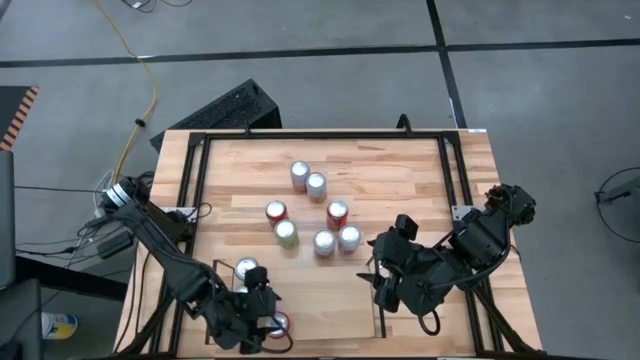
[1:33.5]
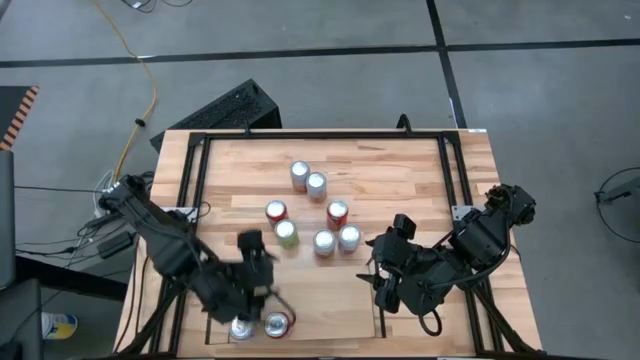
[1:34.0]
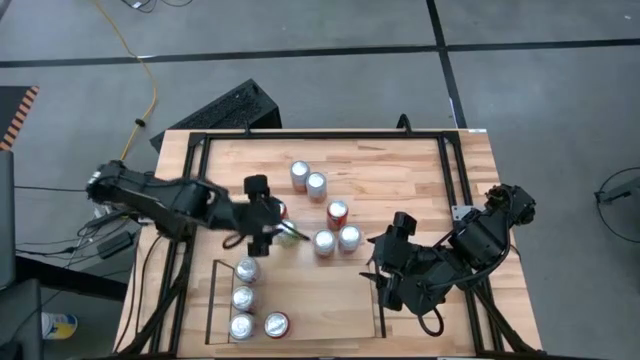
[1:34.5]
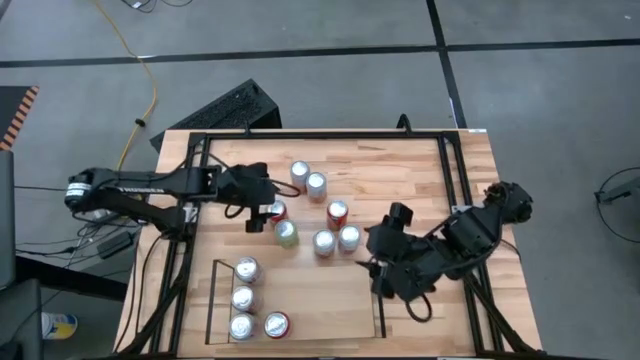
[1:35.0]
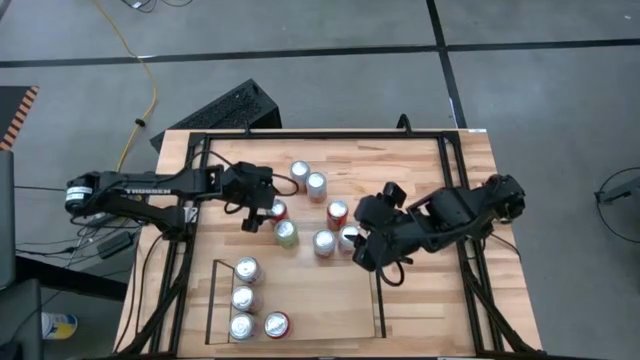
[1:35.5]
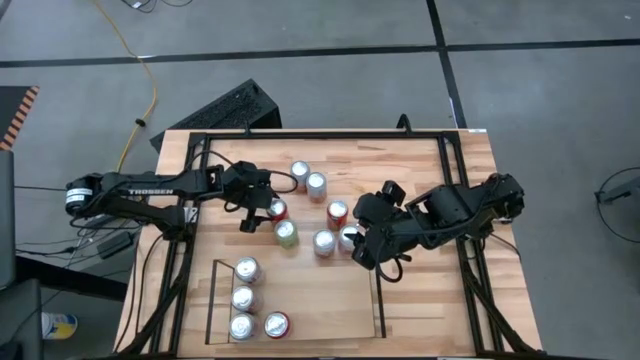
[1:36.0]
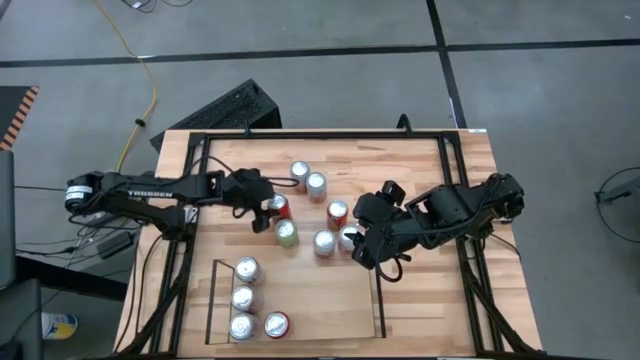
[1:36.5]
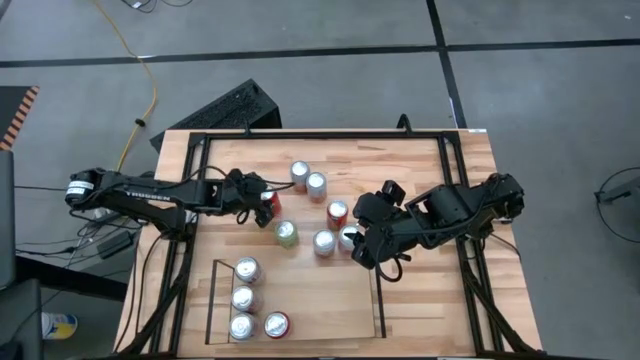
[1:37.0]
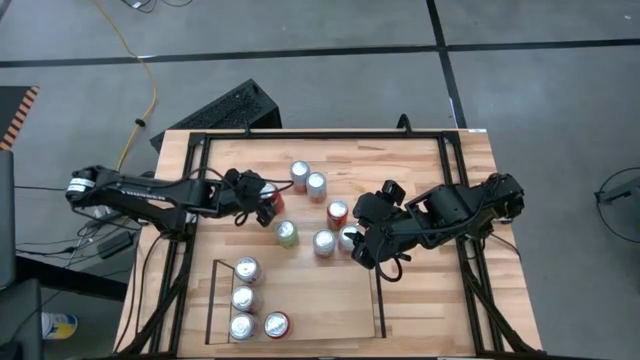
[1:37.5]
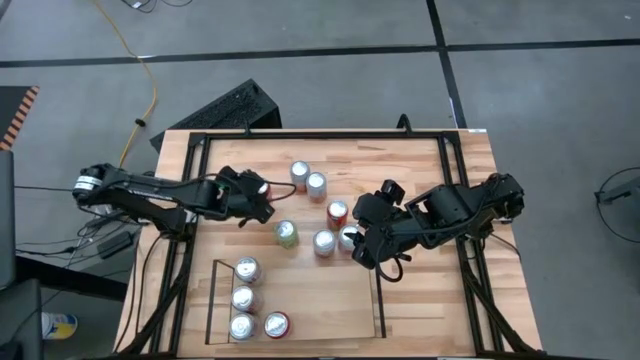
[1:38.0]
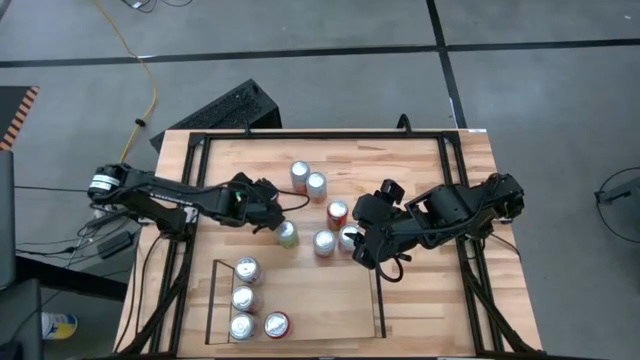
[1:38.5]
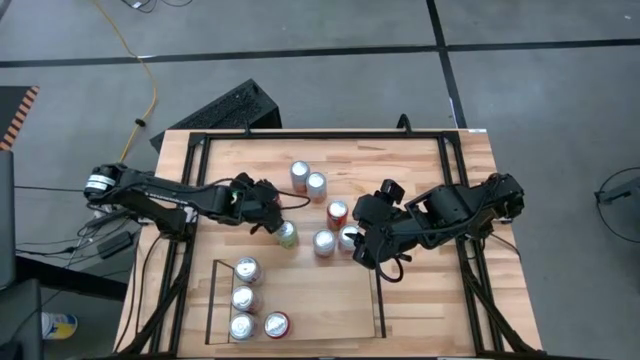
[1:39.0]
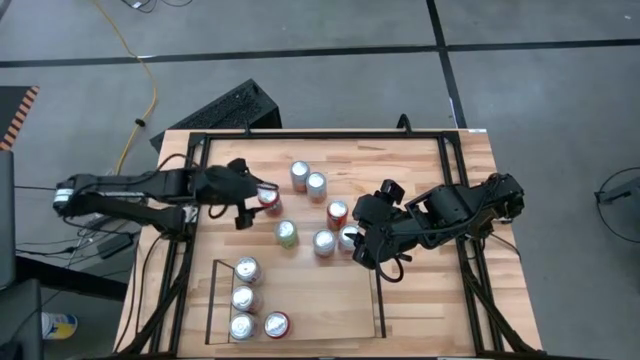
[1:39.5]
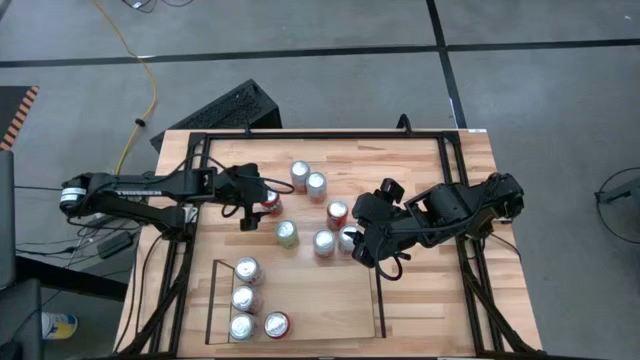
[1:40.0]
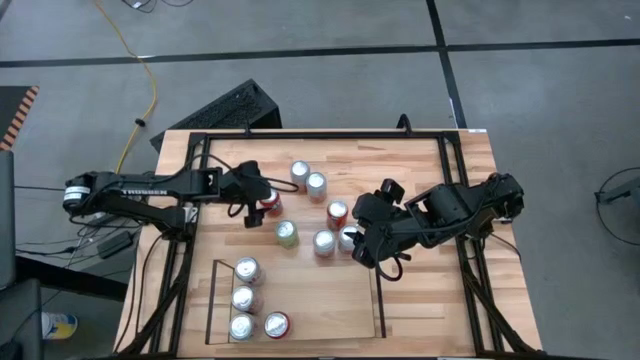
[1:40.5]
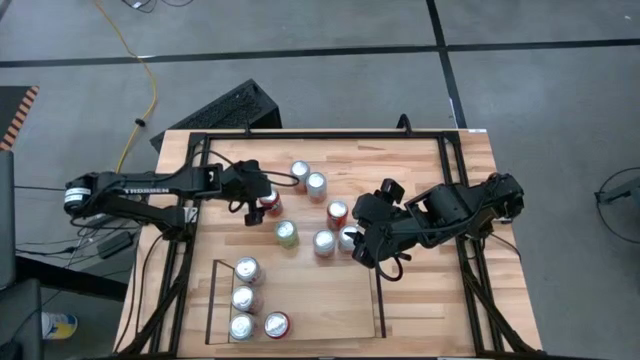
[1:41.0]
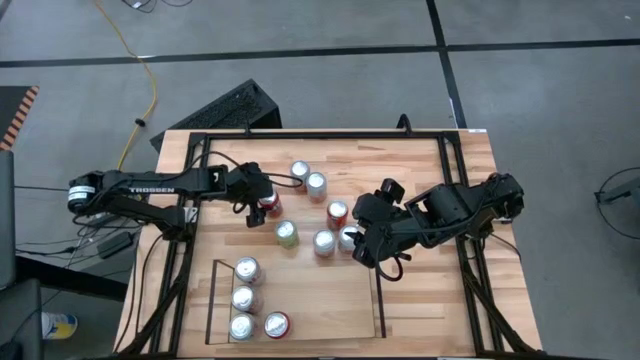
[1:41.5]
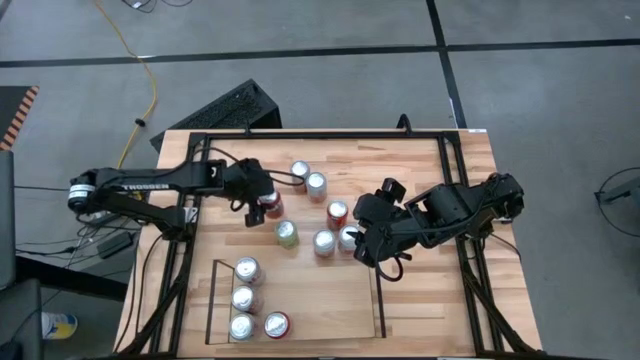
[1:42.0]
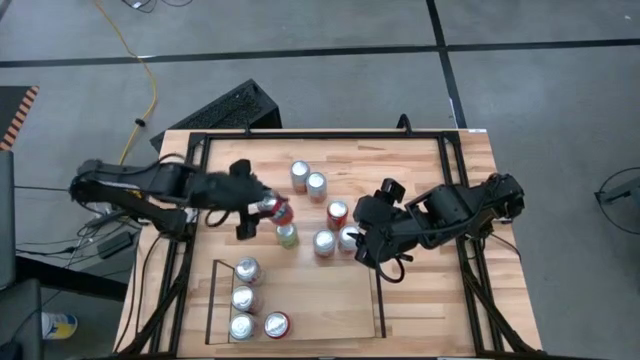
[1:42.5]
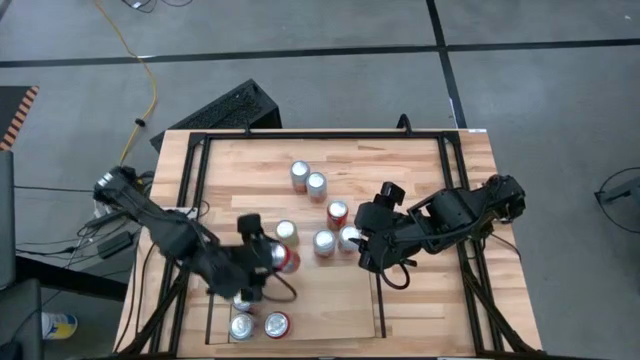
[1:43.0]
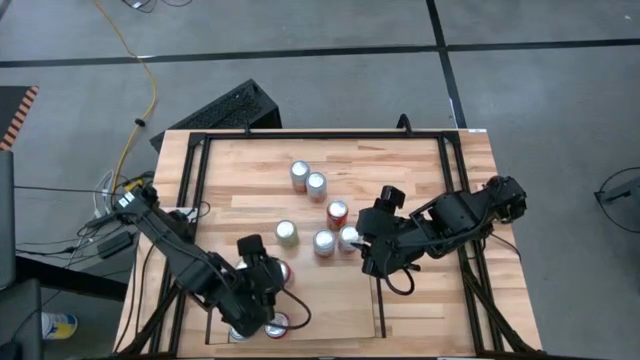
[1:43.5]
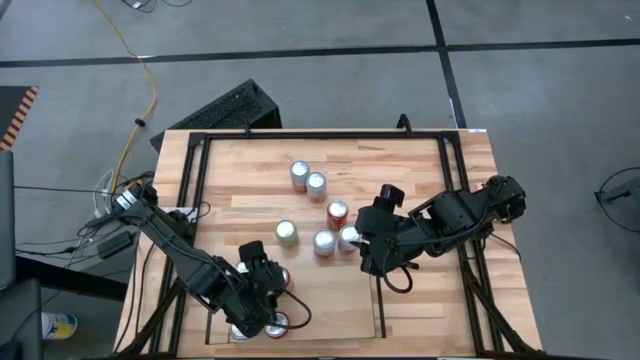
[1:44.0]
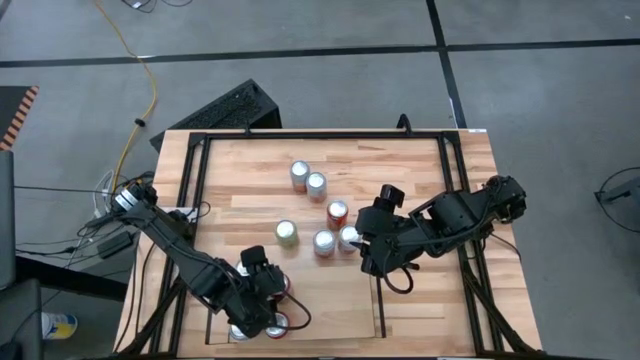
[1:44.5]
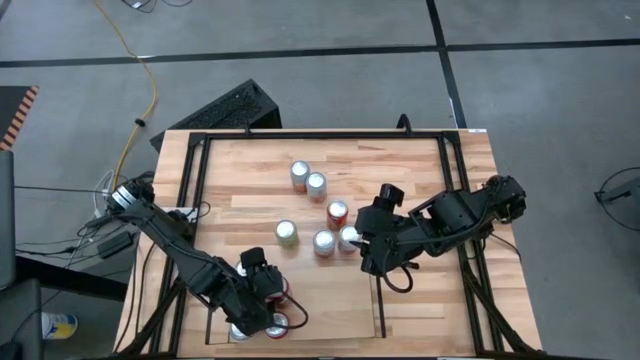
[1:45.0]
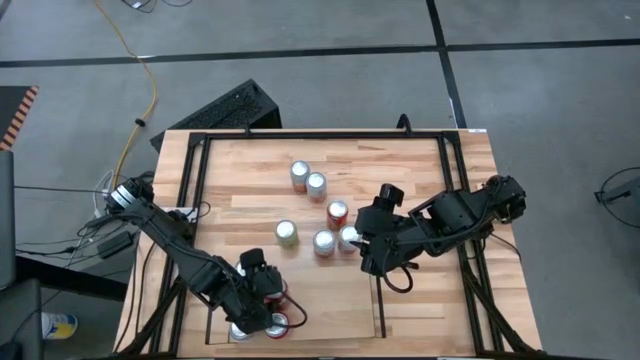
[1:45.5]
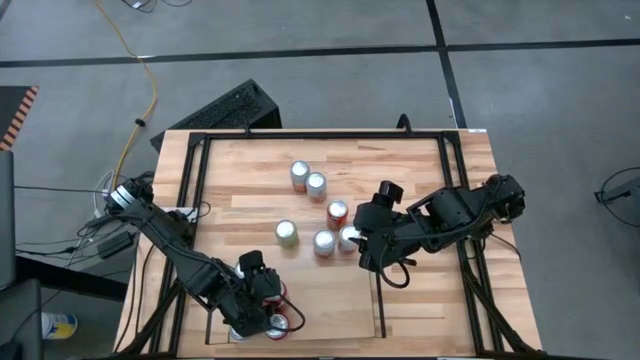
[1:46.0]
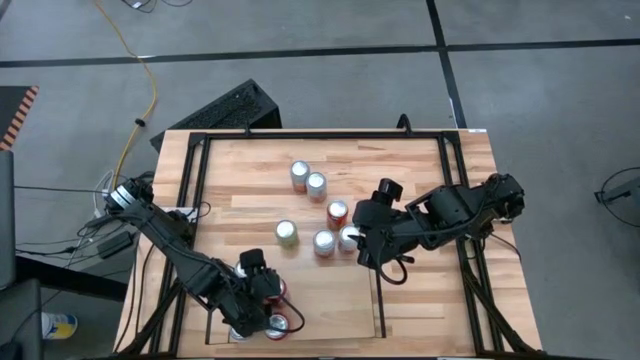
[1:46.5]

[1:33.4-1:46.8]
Task: Place canned beverage on shelf
Put the red soda can on the shelf aligned with the other red soda can

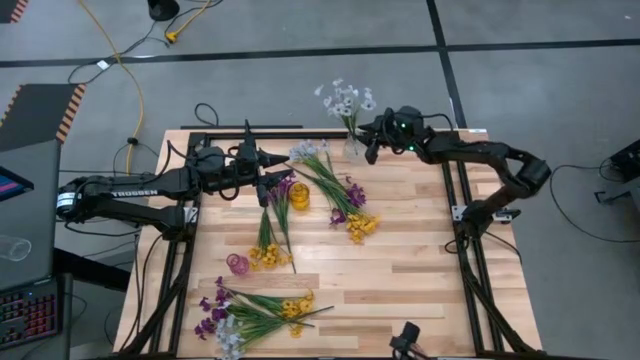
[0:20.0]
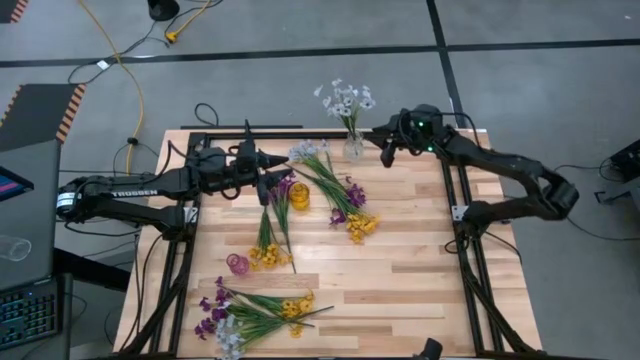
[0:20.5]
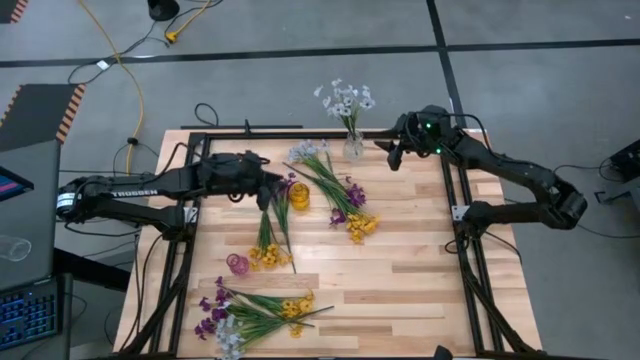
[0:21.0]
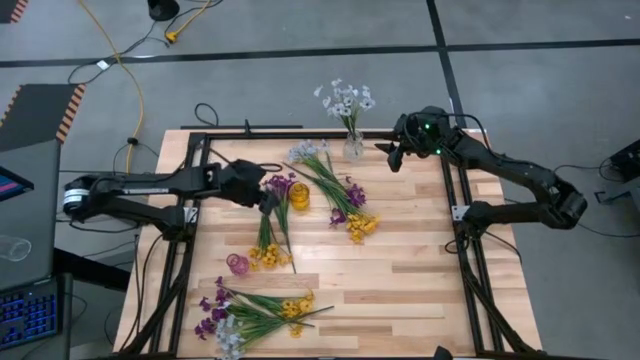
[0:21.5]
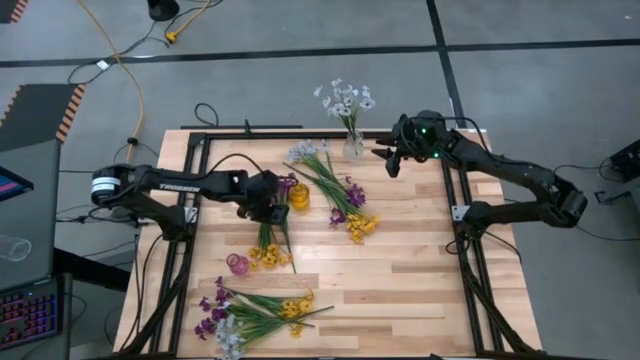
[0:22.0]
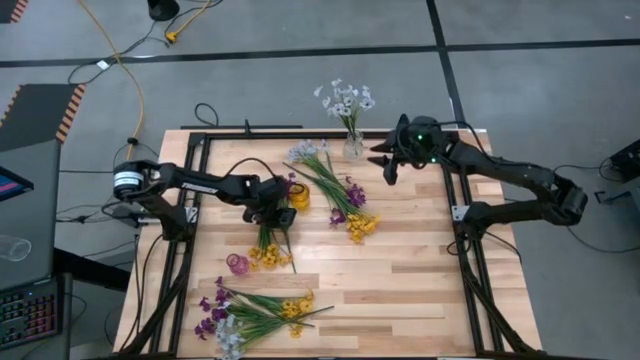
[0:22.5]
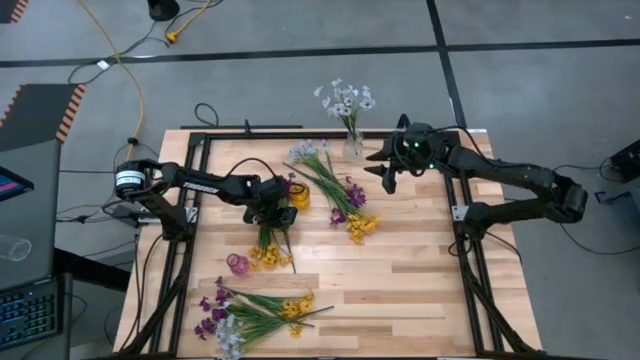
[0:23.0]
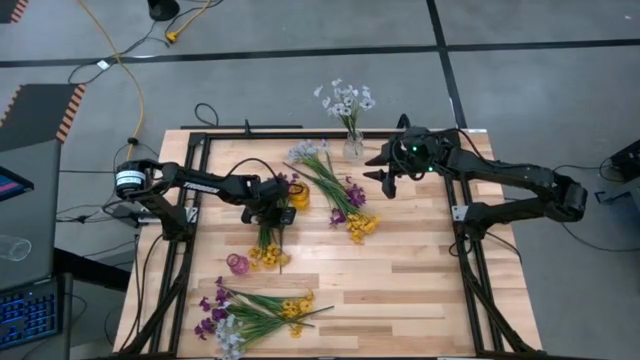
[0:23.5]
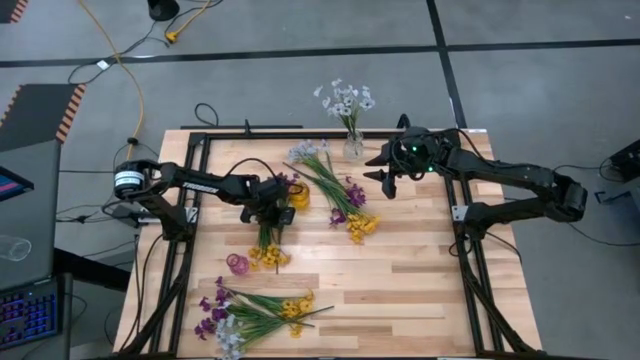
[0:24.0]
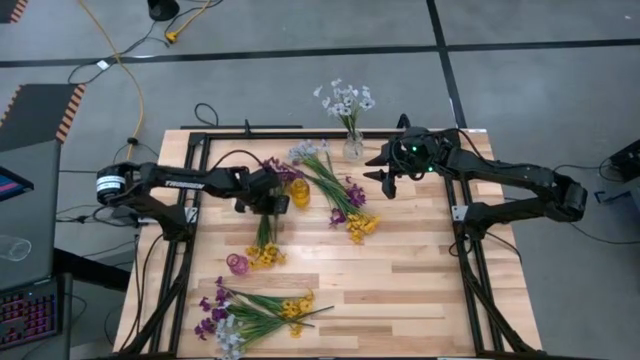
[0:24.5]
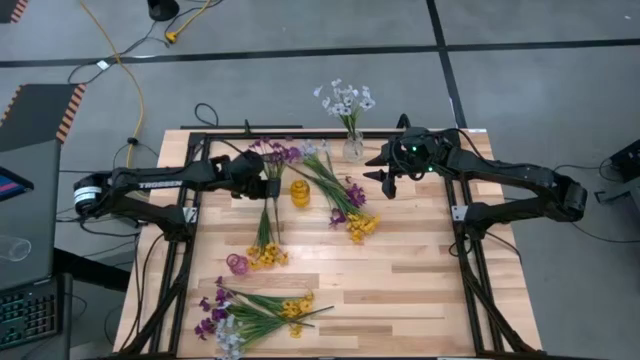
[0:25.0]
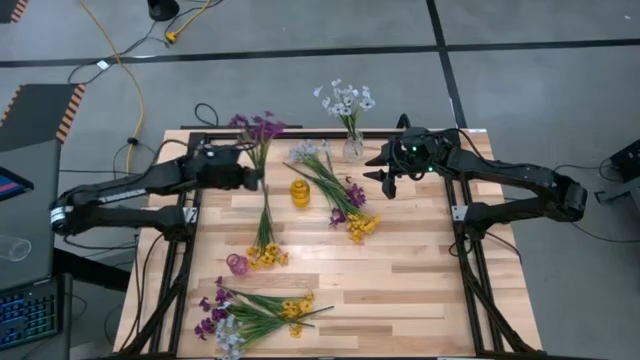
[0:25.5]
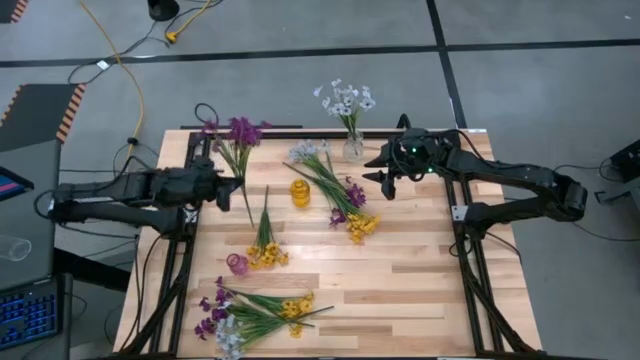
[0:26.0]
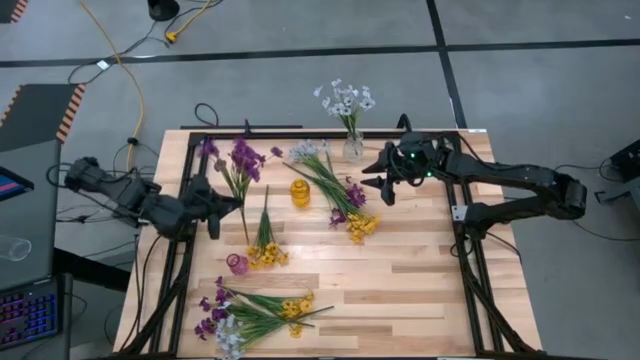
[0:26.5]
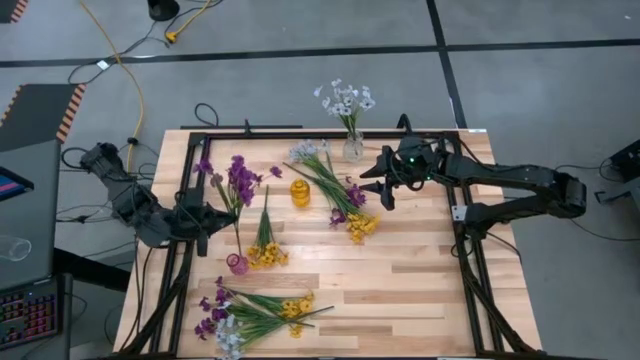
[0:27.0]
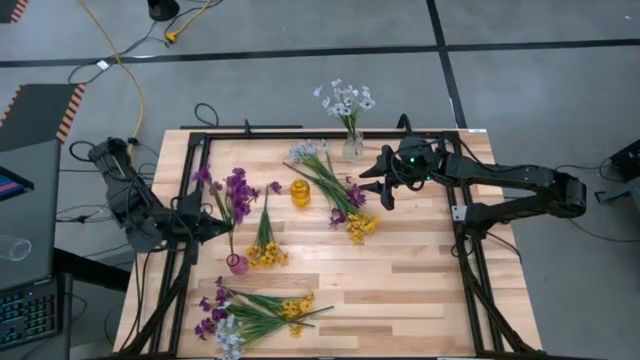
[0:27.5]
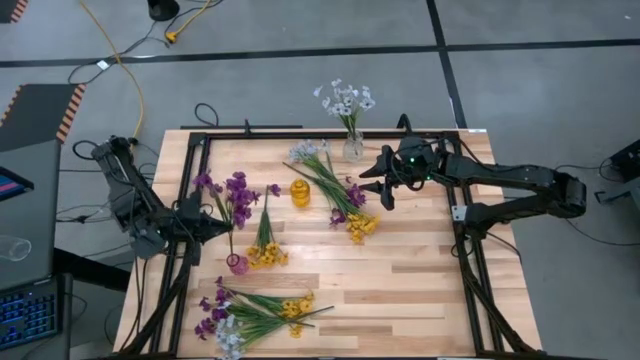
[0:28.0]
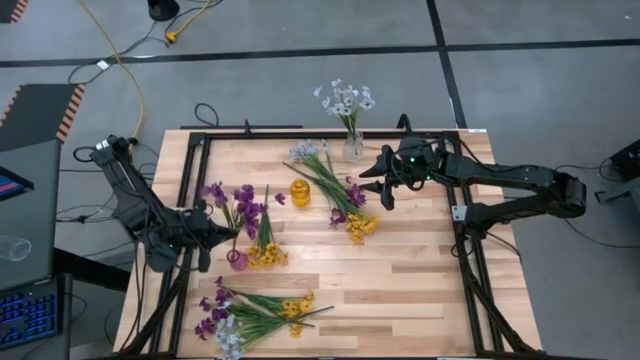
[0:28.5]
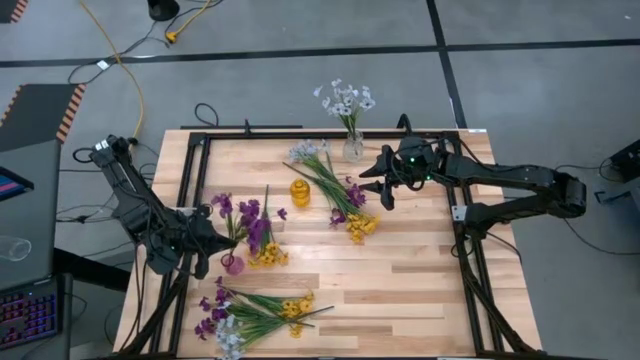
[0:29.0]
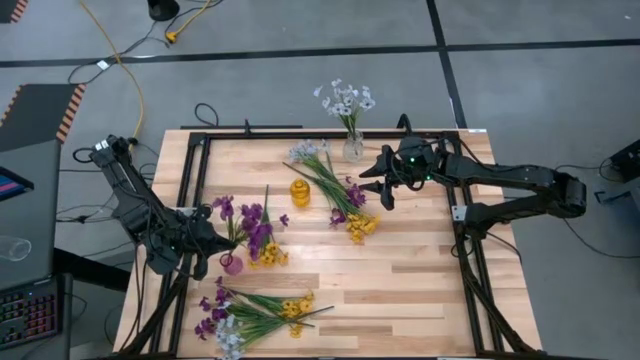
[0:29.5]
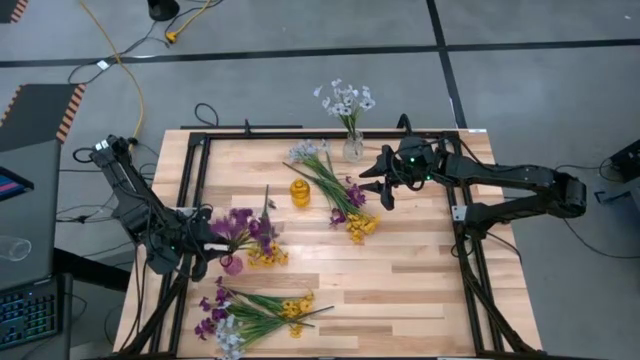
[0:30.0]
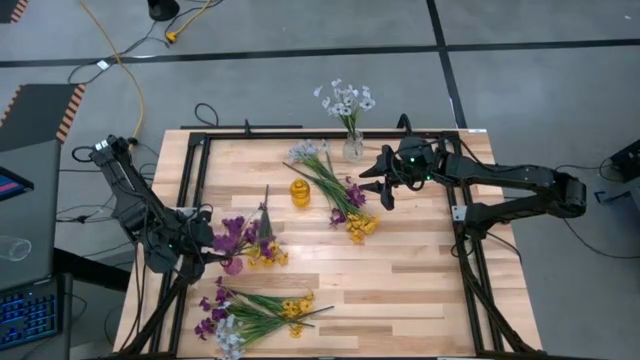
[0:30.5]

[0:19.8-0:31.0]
Task: Sort flowers into vase by color
Put the top left violet flowers into the violet vase
